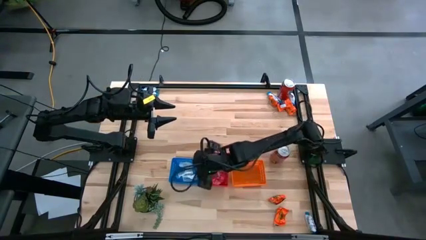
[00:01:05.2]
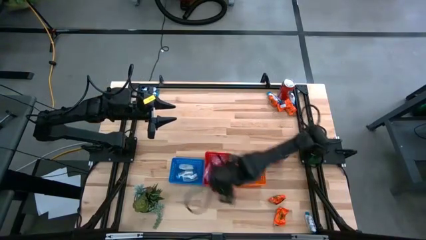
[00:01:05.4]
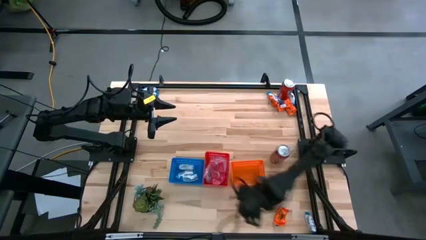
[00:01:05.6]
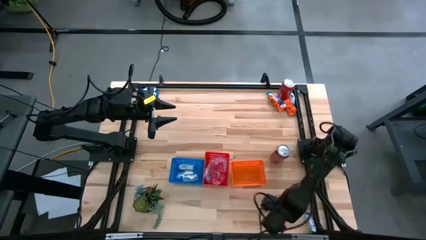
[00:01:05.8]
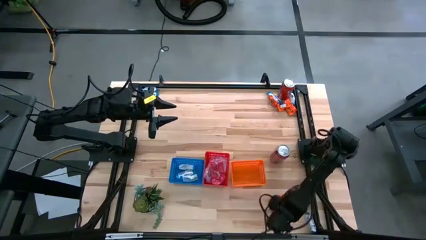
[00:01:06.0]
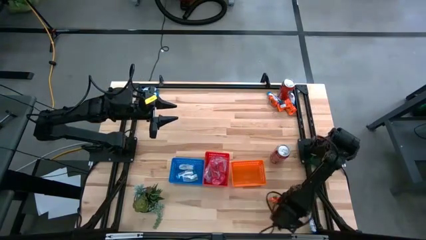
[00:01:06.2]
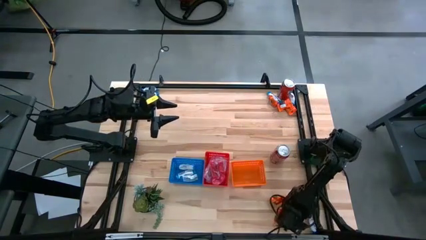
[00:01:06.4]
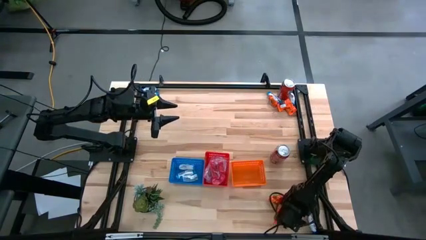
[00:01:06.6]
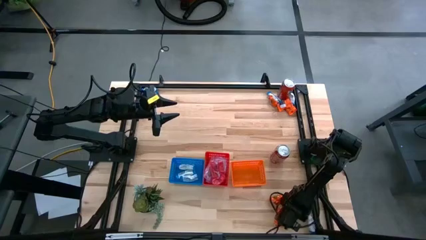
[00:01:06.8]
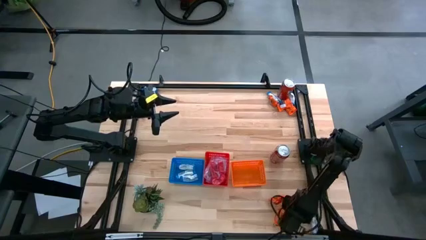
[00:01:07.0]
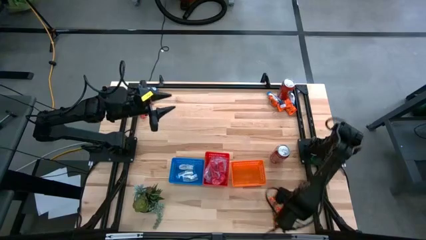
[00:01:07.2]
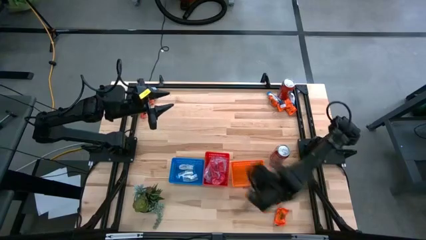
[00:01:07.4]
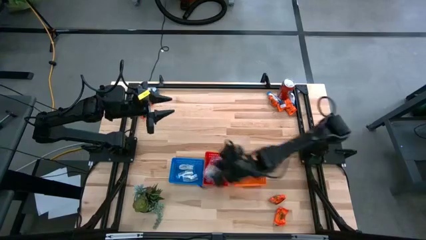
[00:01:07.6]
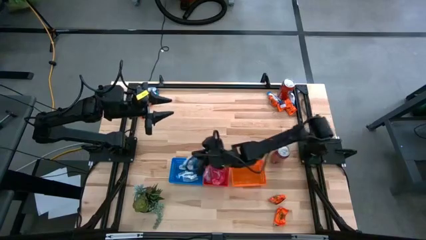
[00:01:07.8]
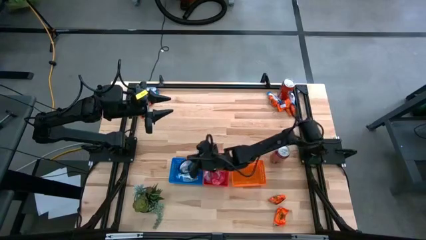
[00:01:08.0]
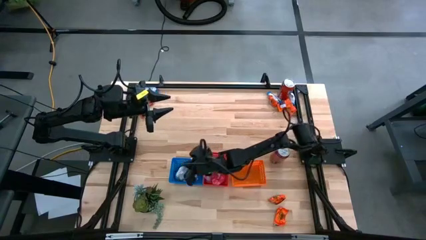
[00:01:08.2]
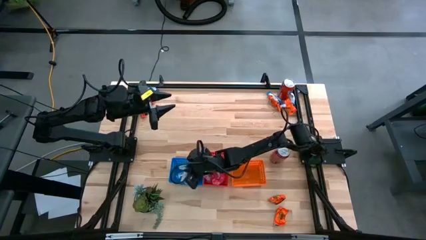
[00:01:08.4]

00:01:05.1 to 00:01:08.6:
Task: Sort candy
Put the white candy pack into the blue bin

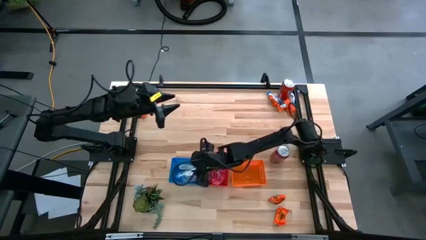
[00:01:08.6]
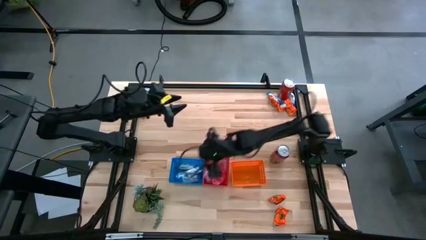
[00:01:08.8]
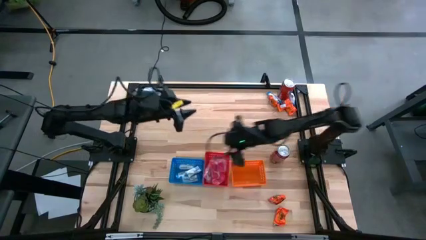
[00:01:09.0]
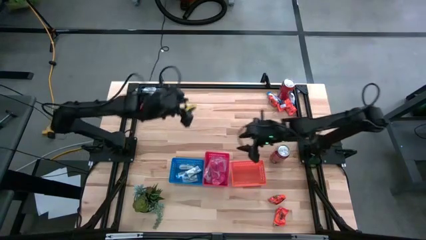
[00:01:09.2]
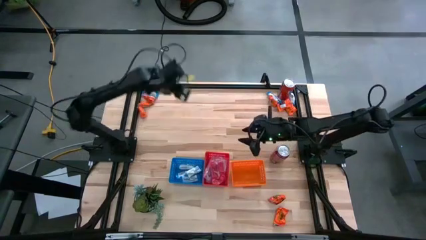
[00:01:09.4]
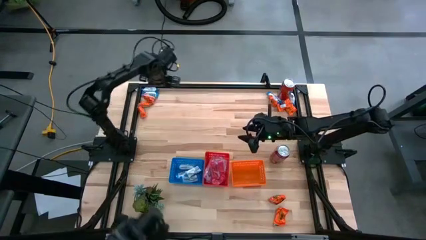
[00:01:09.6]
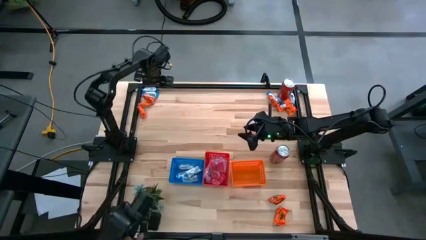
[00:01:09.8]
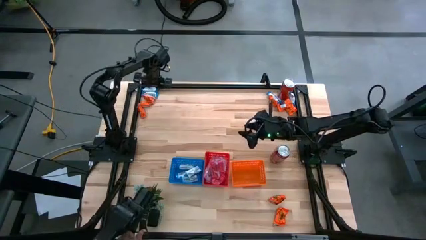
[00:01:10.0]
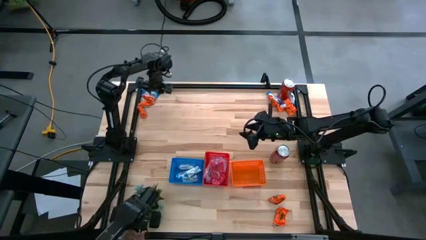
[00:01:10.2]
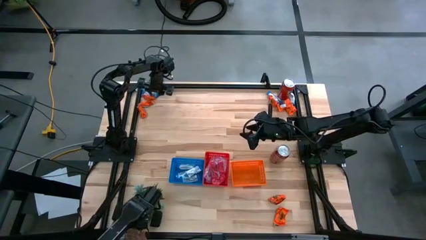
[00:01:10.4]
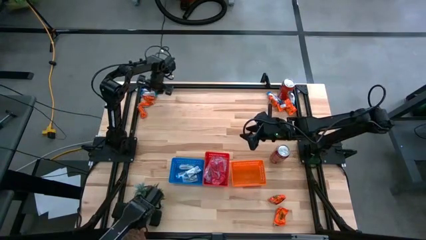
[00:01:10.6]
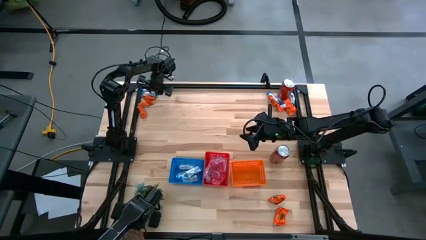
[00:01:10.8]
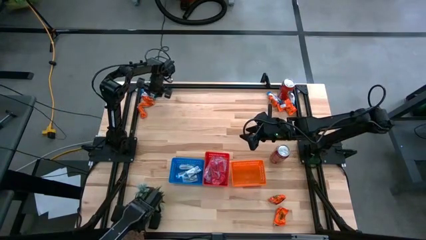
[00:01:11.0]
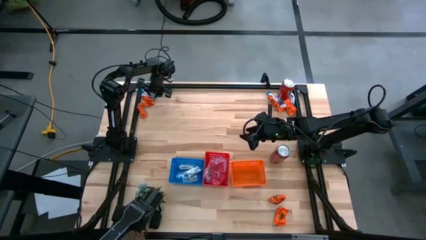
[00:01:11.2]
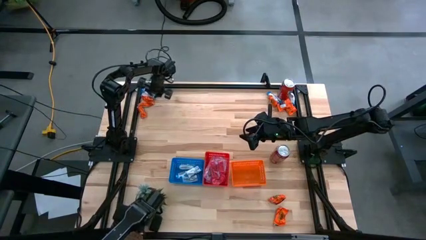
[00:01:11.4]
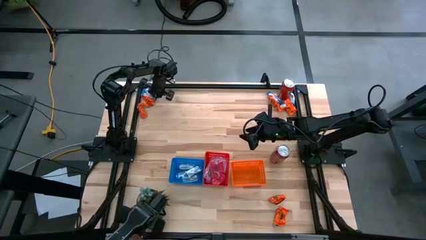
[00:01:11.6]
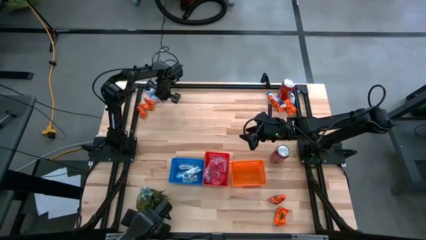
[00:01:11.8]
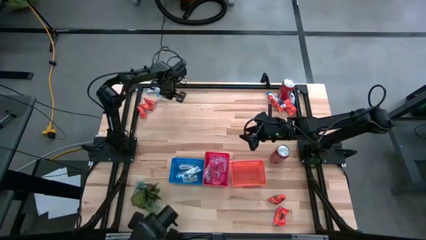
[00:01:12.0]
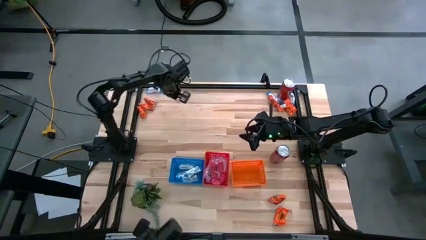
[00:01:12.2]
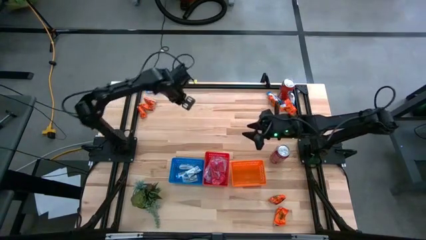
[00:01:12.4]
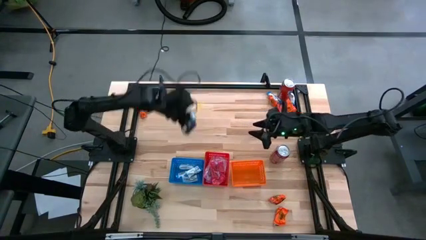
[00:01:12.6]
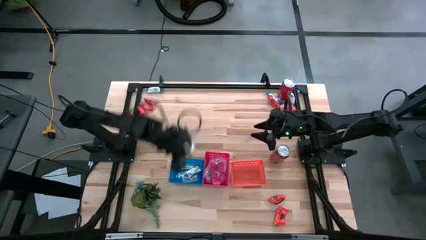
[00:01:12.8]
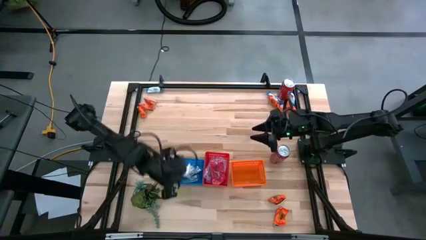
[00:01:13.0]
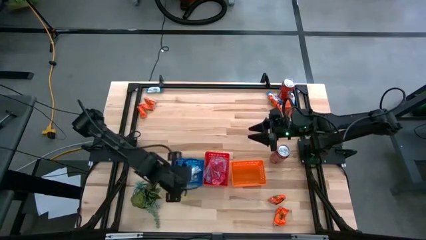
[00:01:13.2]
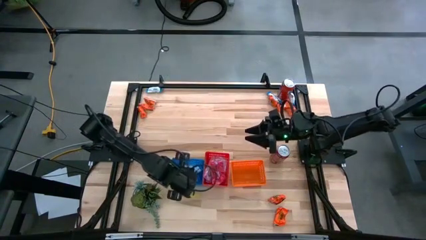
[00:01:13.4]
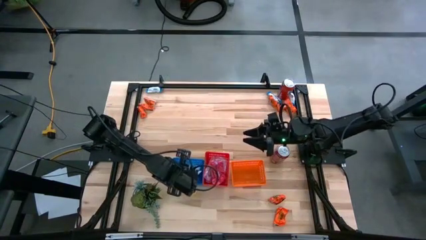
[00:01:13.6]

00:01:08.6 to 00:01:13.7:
Put the white candy pack into the blue bin

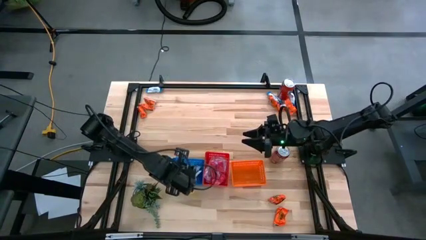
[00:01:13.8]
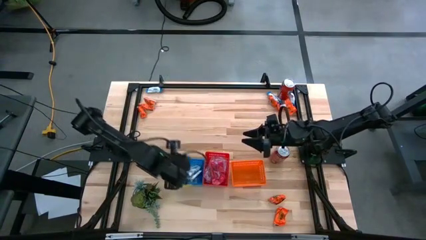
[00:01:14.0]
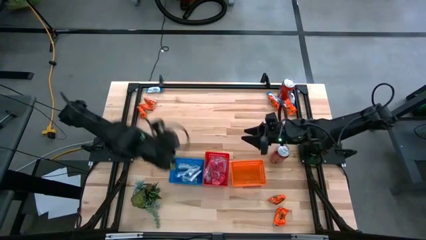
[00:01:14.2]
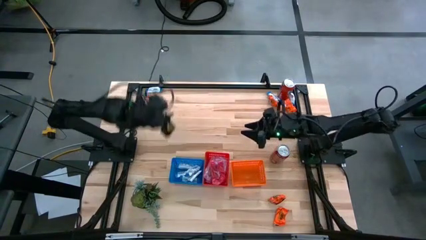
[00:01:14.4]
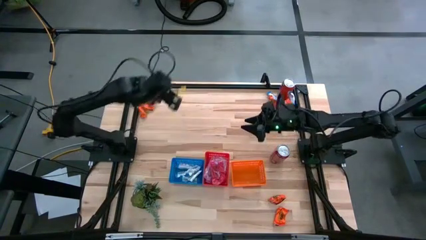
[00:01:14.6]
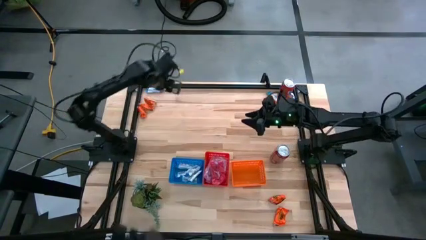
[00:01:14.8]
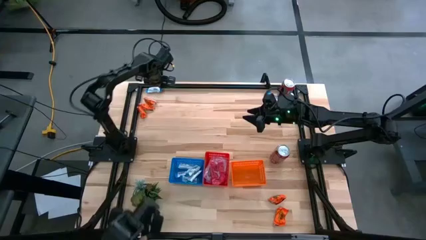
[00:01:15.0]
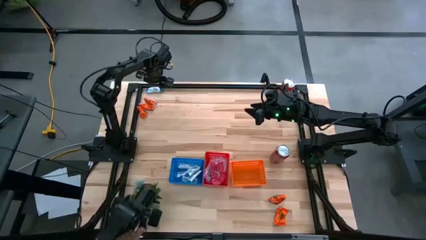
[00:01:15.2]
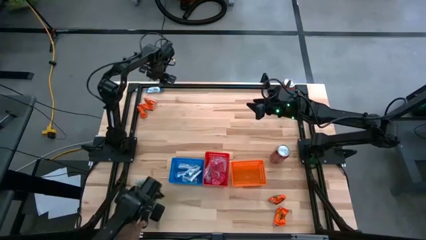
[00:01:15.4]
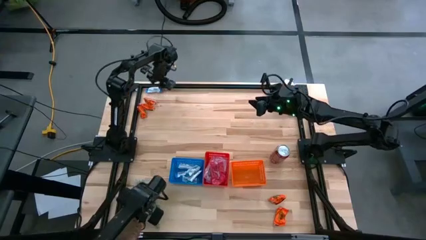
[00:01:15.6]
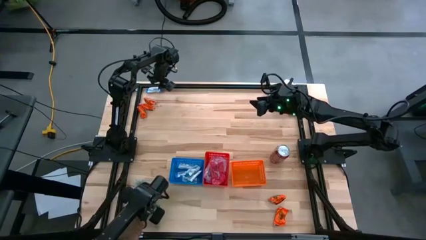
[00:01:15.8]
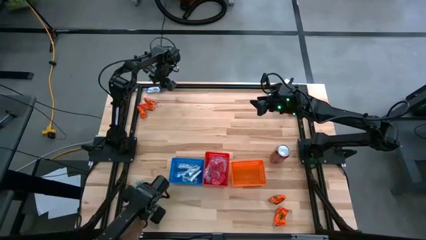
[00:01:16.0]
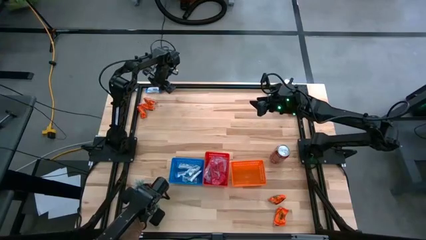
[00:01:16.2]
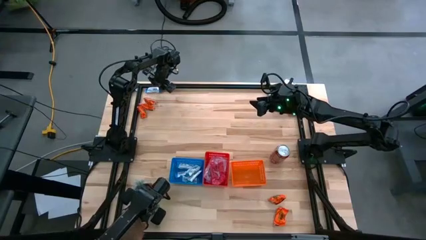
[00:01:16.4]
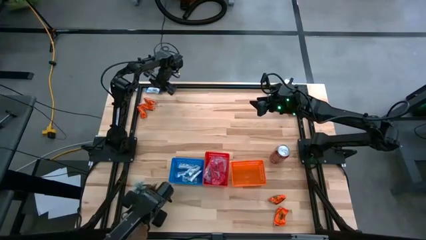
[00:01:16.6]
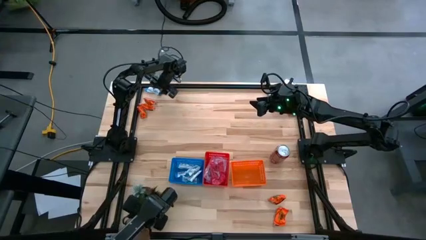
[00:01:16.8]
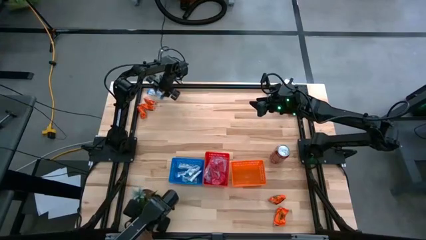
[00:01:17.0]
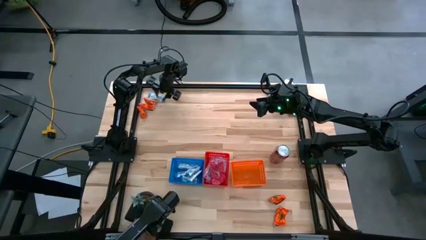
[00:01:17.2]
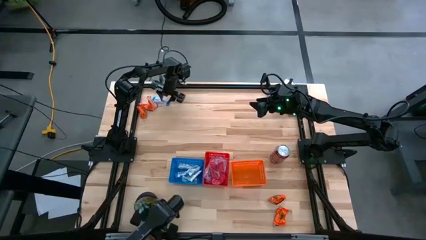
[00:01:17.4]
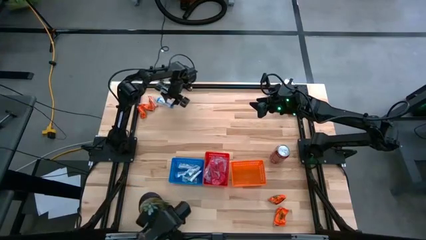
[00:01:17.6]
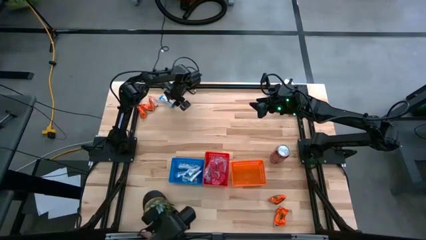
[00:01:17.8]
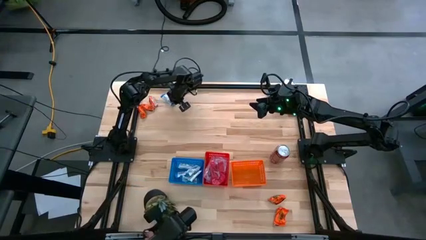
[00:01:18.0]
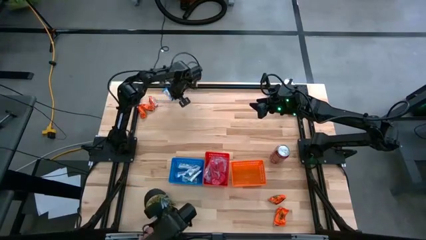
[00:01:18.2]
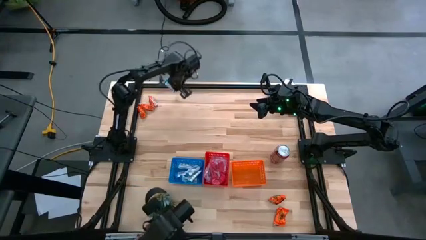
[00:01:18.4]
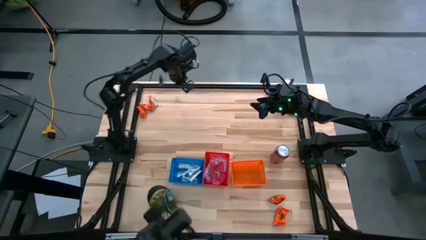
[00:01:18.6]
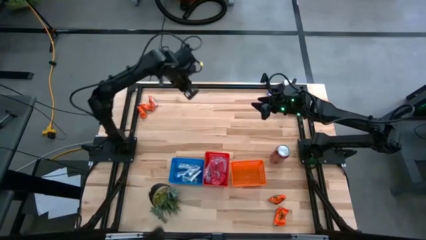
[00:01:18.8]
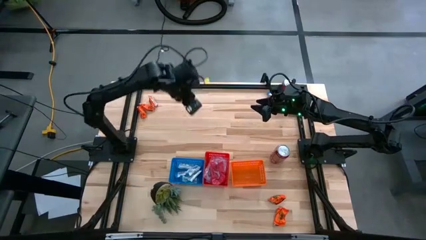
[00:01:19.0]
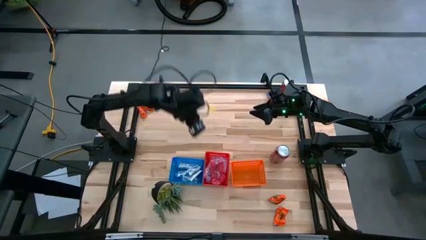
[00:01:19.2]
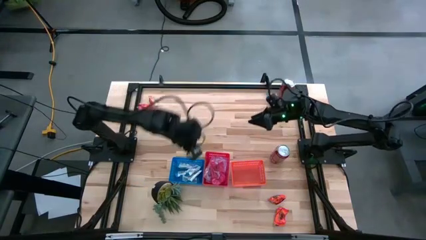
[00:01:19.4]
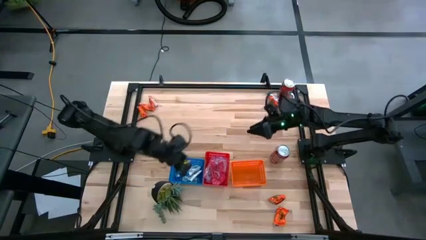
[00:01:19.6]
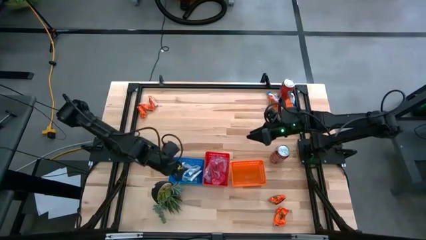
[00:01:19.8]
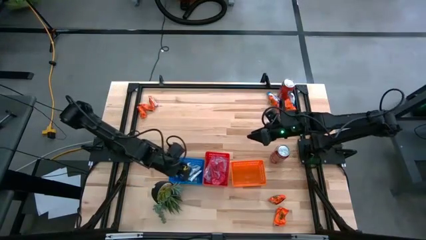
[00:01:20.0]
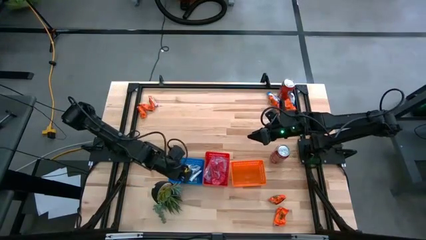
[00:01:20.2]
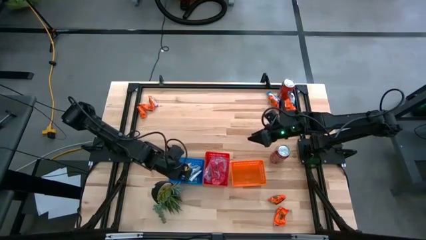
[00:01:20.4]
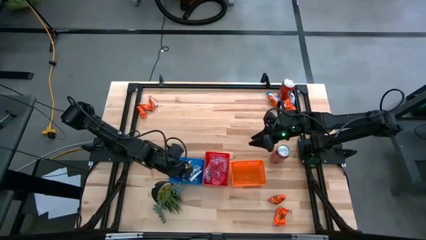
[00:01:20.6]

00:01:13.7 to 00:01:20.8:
Put the white candy pack into the blue bin

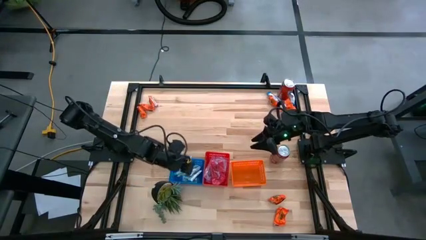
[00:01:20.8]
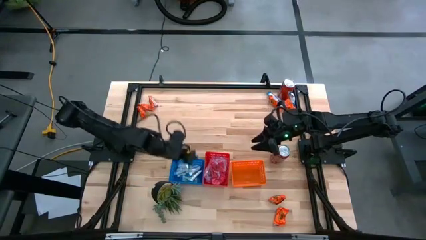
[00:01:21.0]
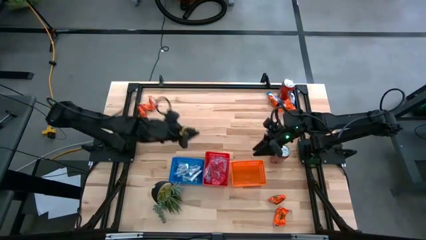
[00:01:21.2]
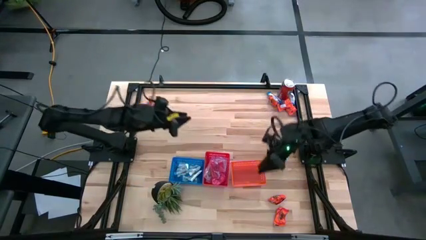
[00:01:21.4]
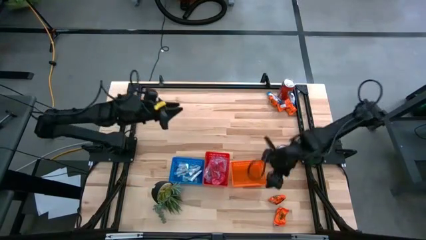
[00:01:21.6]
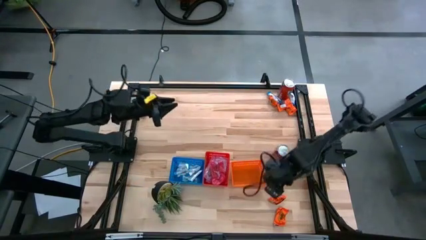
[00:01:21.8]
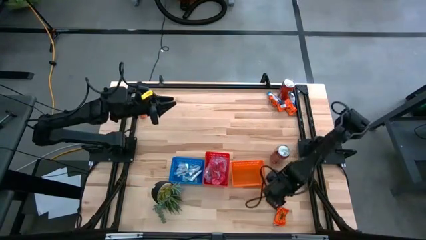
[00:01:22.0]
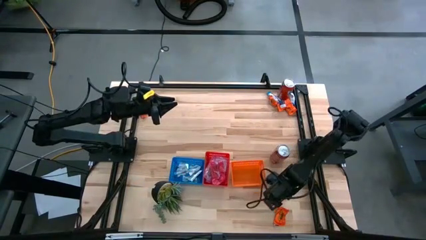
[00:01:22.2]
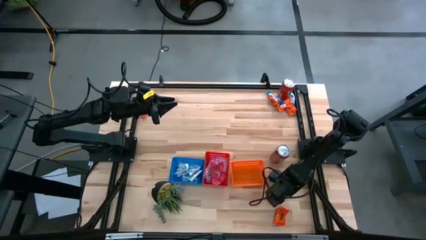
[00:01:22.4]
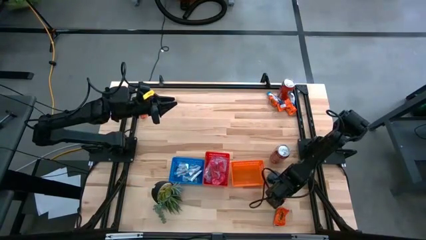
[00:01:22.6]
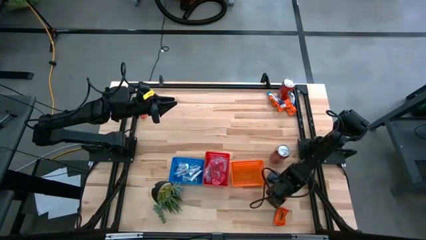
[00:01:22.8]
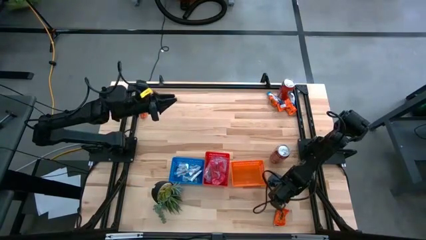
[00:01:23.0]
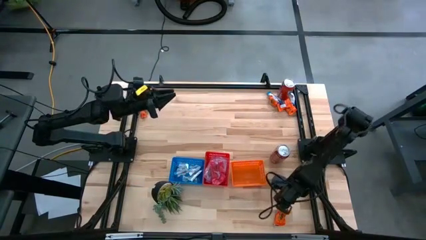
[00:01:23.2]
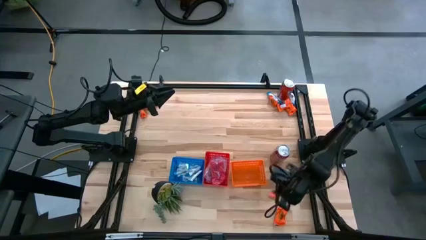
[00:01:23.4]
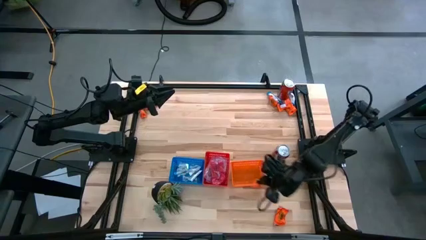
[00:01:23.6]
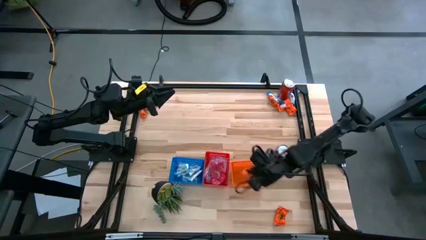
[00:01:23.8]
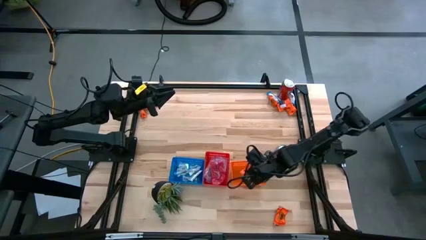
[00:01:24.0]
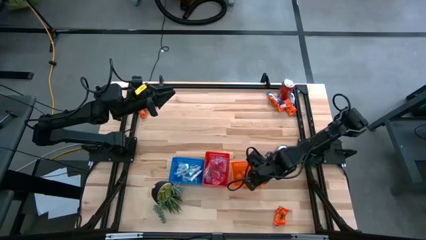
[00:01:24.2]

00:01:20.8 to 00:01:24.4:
Put the orange candy pack into the orange bin
